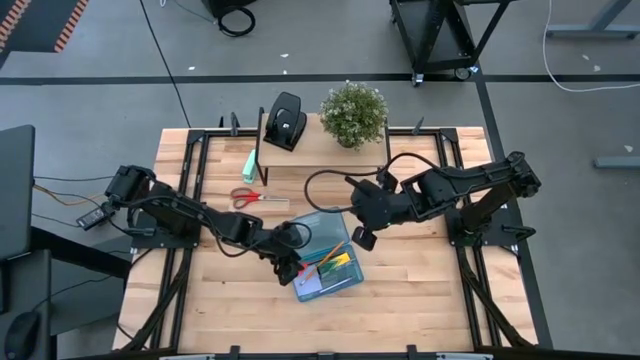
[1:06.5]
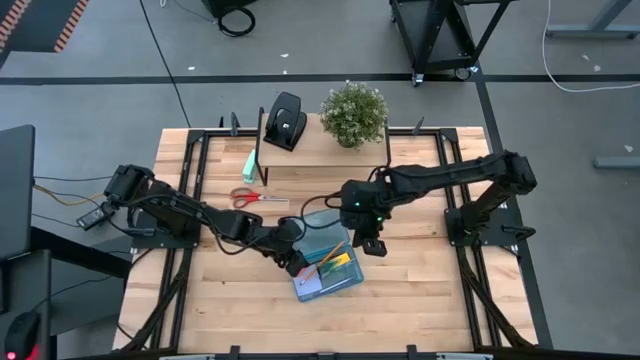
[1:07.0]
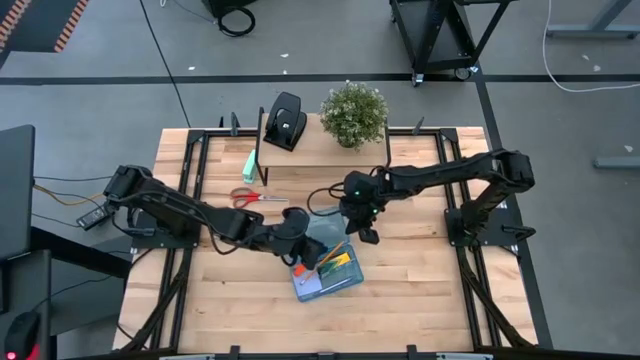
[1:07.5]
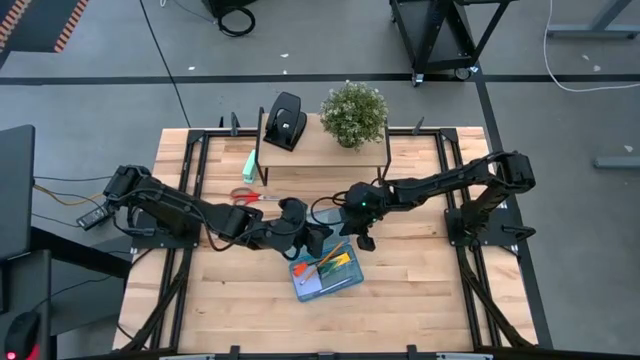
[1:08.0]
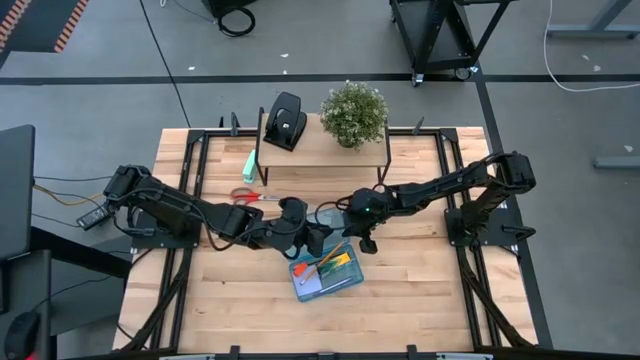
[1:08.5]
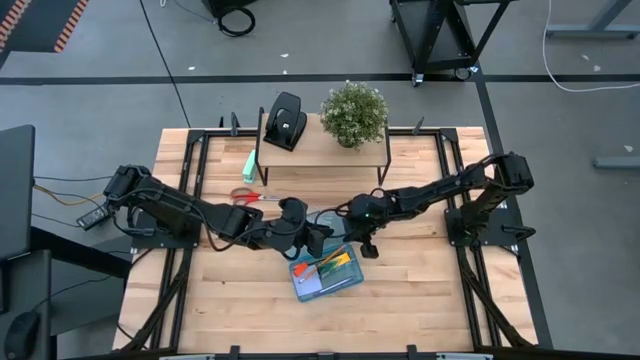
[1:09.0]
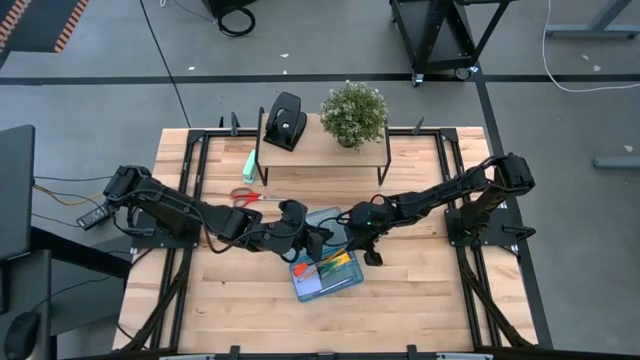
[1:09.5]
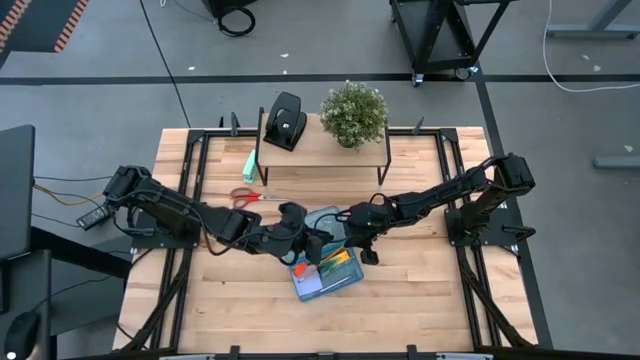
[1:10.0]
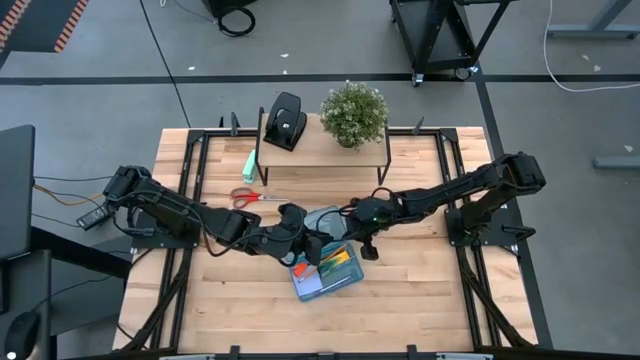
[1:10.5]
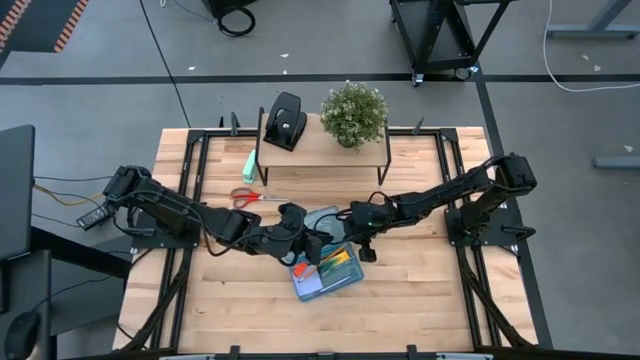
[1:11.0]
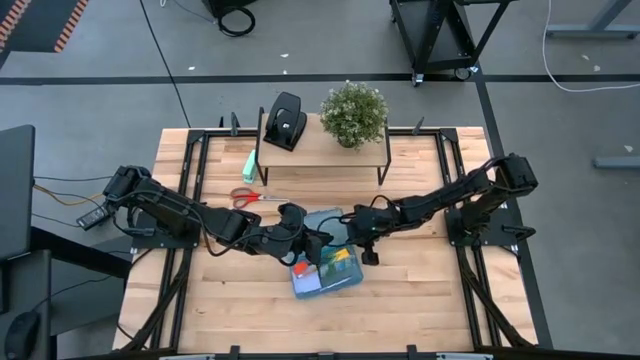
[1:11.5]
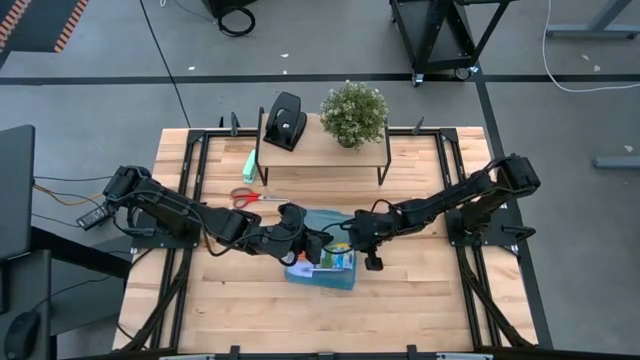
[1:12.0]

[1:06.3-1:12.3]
Task: Pack school essentials
Adjust the orange pencil in the blue supply box

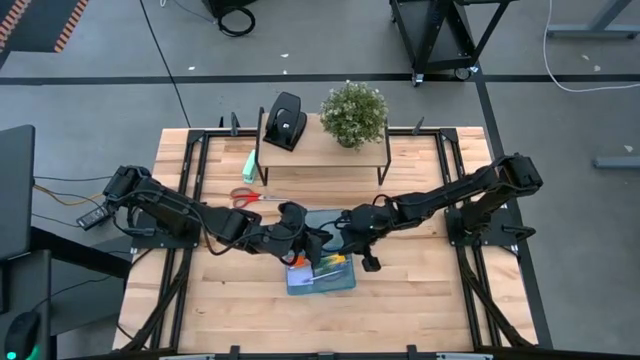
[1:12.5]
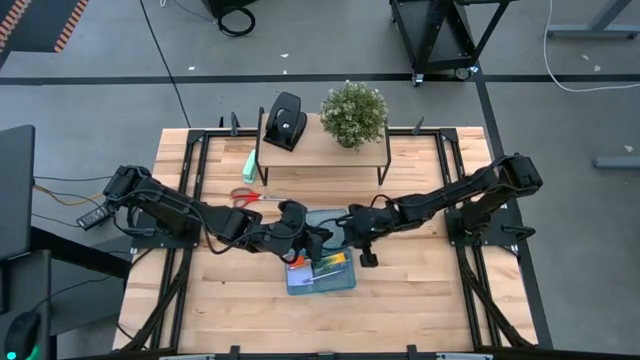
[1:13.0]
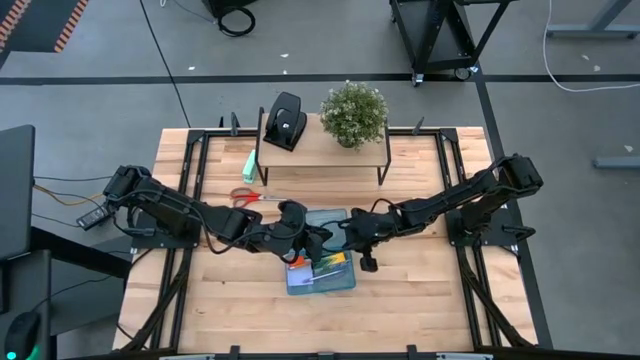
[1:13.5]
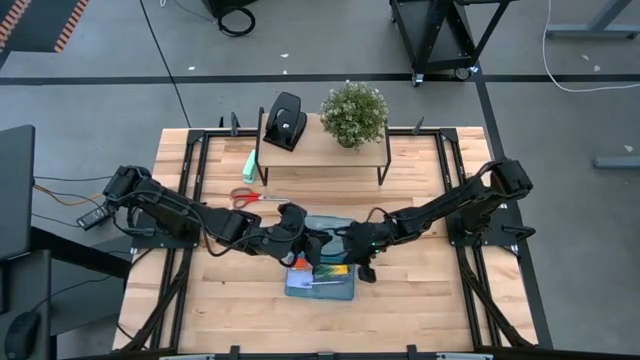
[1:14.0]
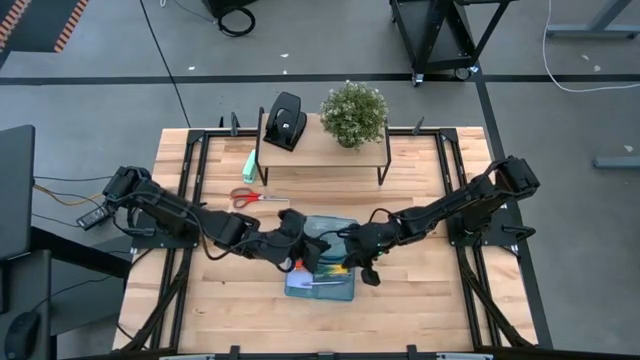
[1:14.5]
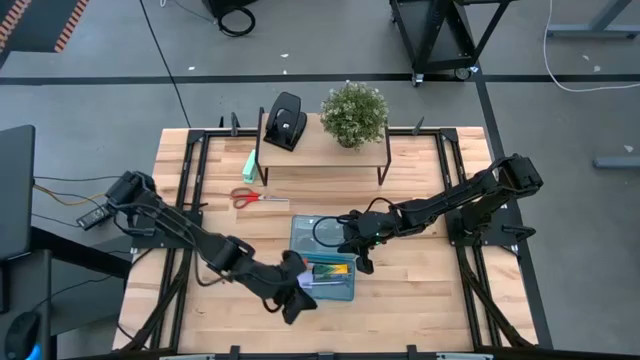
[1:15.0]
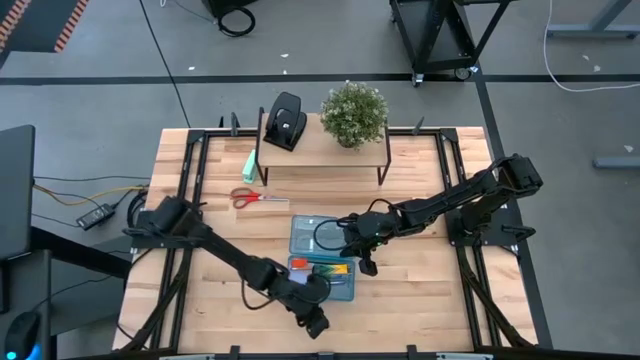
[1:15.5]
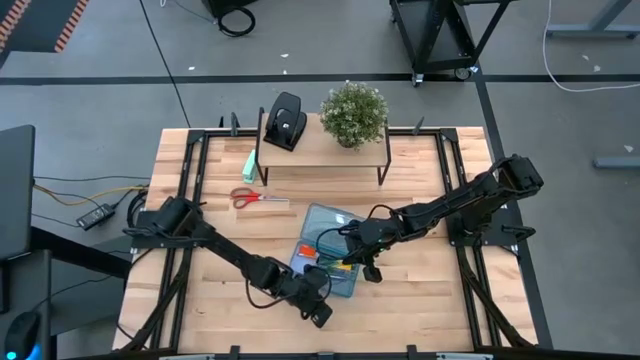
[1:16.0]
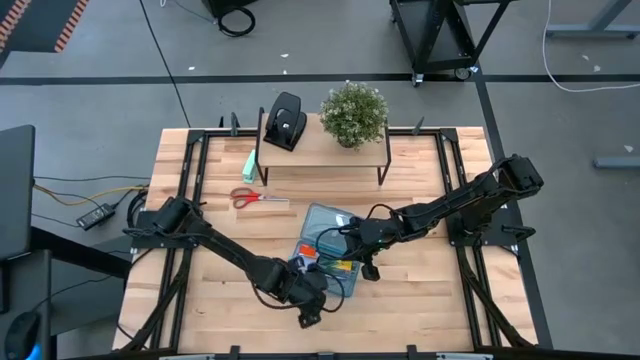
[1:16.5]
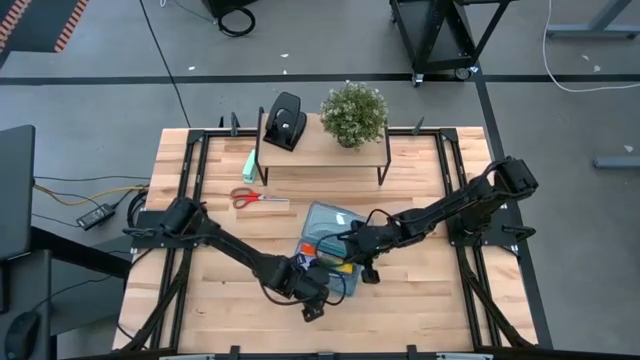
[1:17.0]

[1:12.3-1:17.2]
Adjust the yellow crayon box in blue supply box

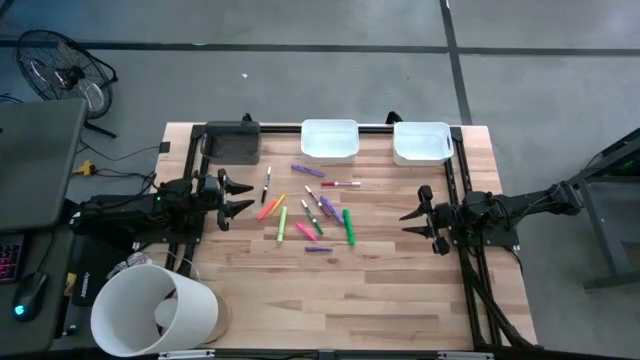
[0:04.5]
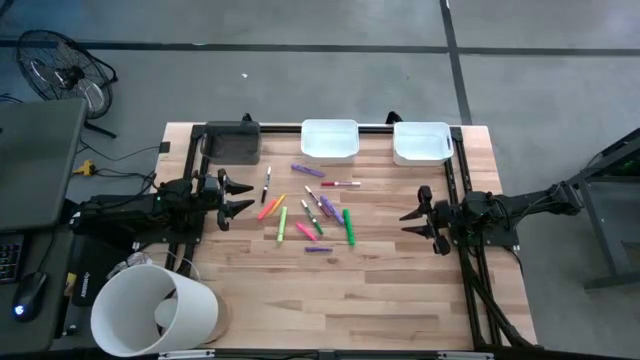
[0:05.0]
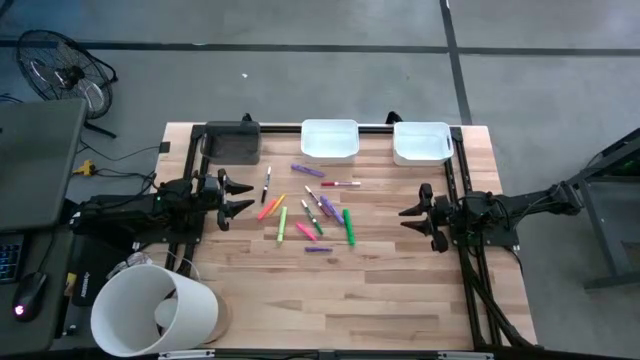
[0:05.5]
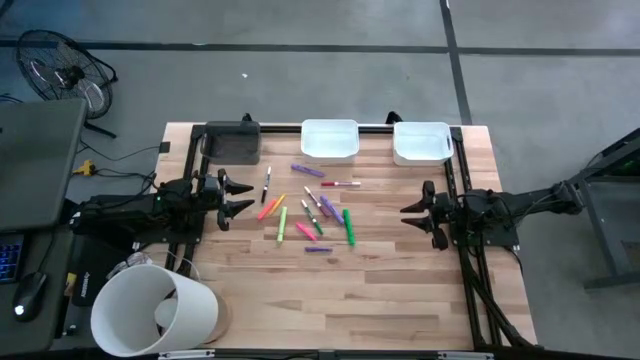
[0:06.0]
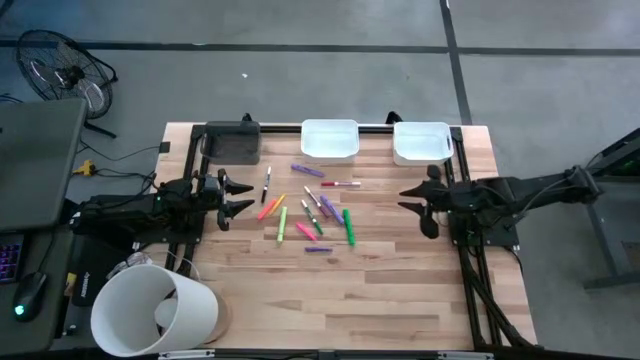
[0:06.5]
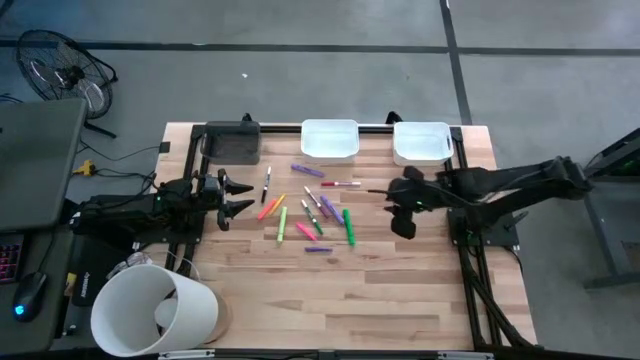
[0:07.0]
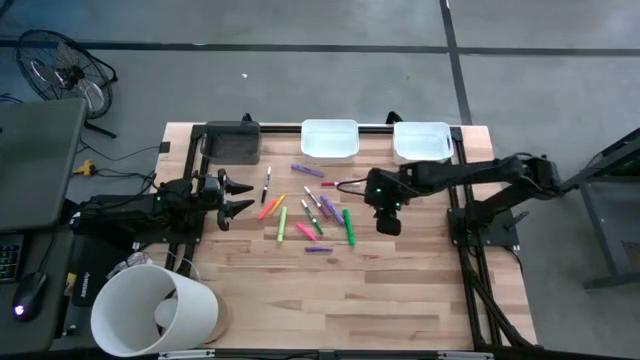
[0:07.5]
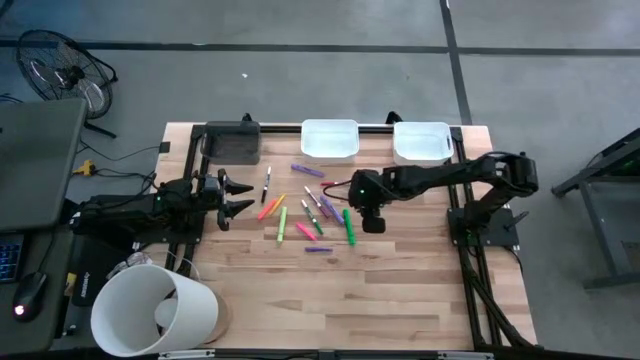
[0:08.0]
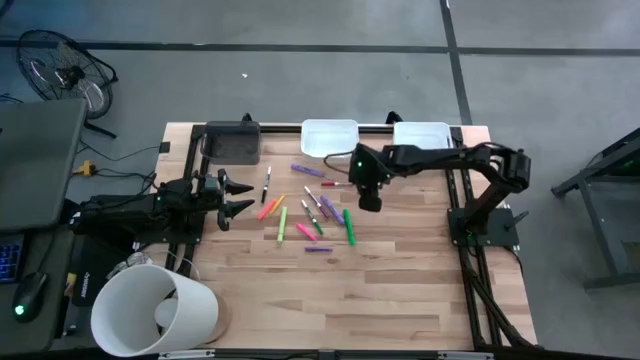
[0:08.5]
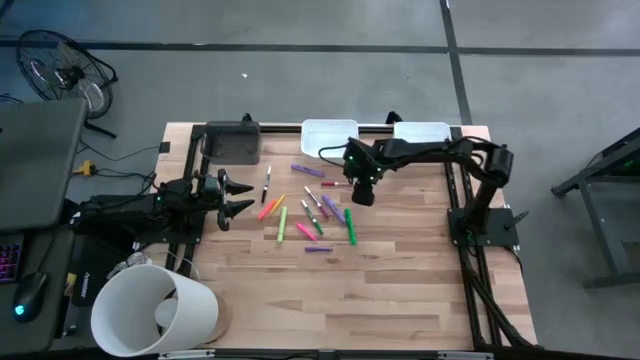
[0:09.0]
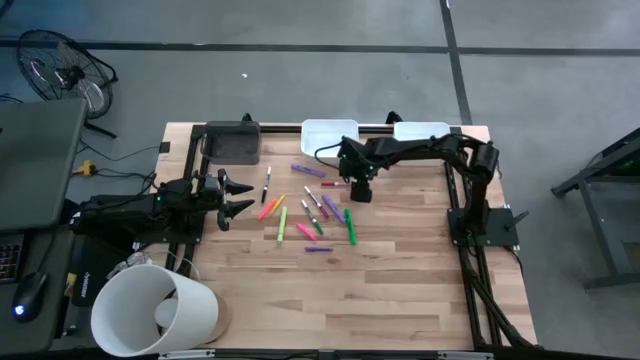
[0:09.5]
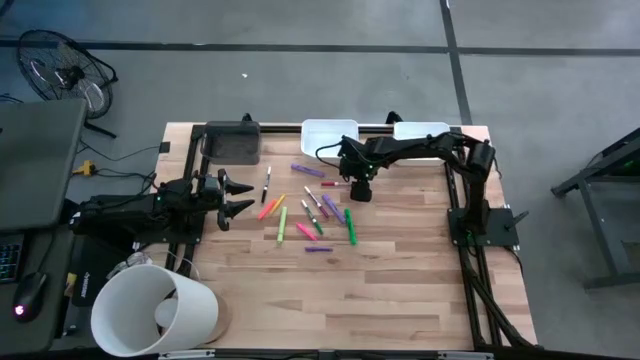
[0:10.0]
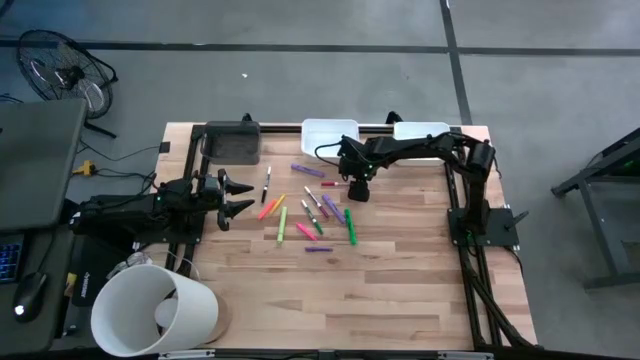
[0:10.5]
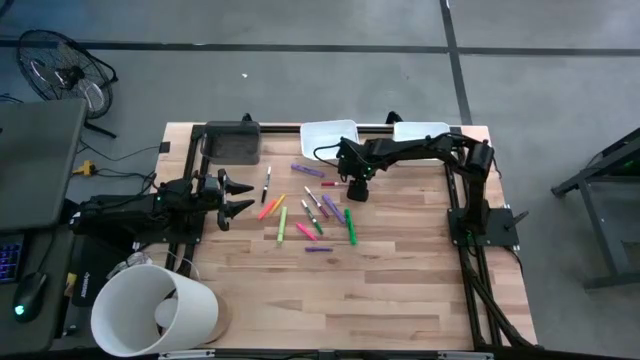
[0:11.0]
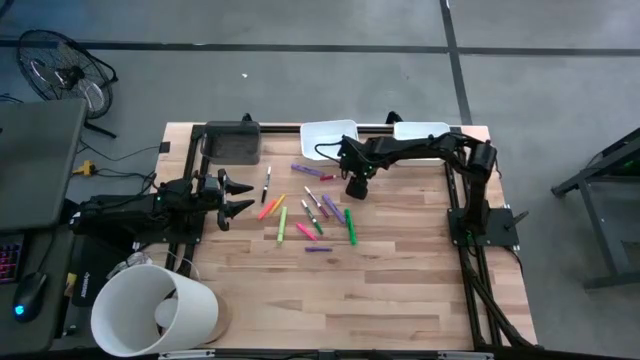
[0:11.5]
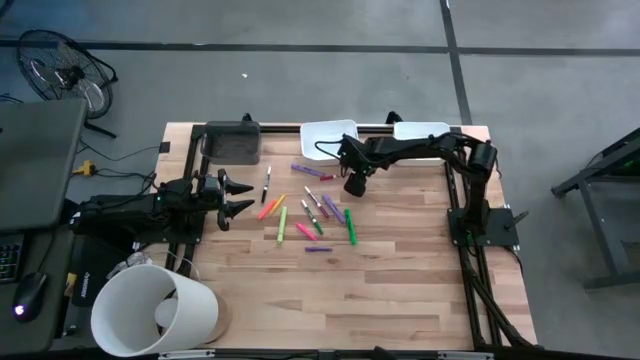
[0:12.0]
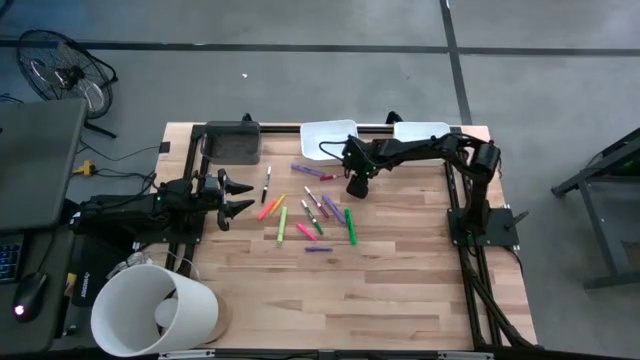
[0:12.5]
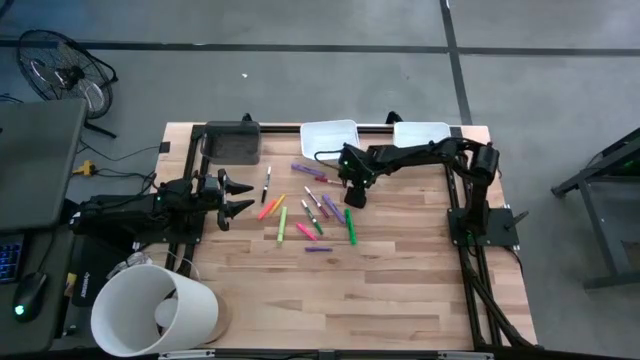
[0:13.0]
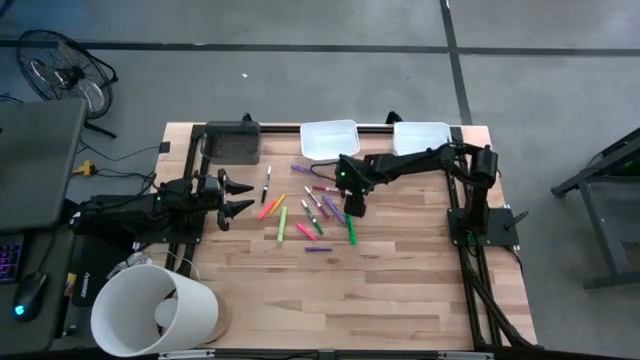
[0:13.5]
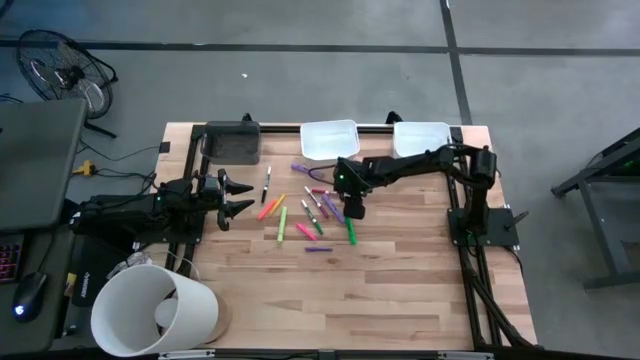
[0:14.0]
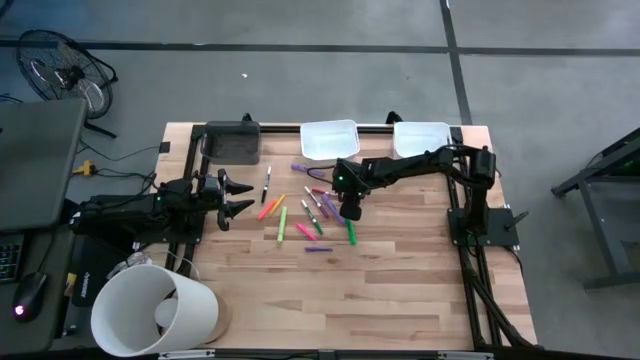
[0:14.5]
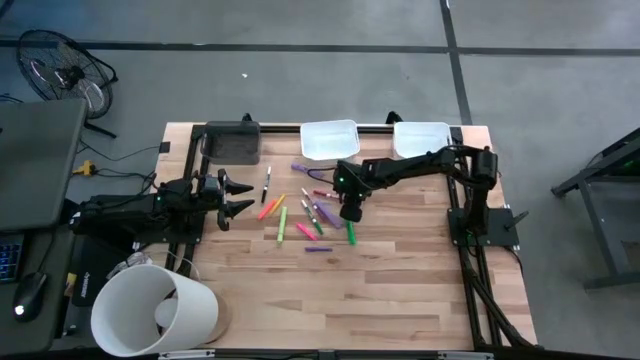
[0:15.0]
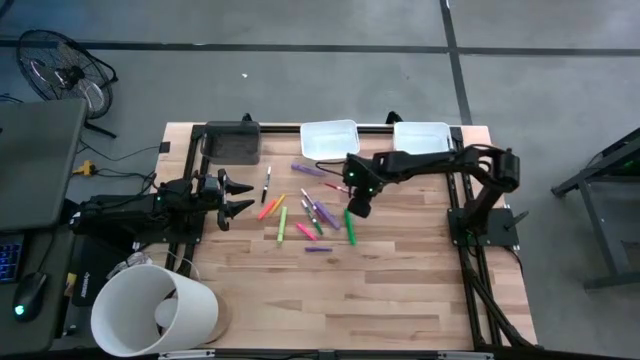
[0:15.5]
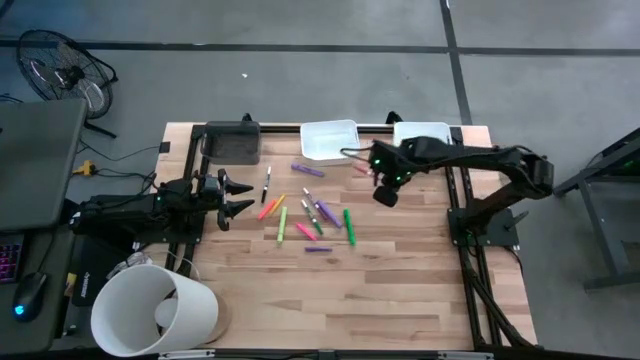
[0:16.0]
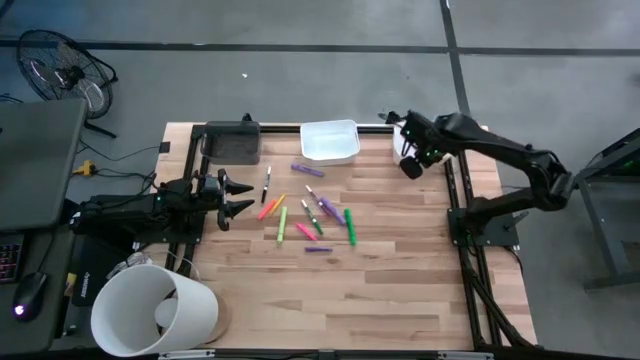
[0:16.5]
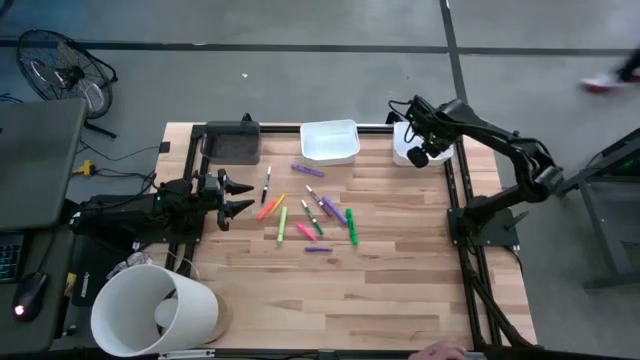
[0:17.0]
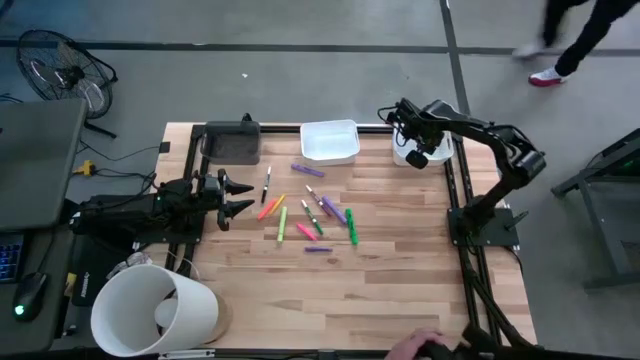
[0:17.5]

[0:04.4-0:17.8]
Task: Pick & Place Markers
Put the red marker pen into the right white bin
